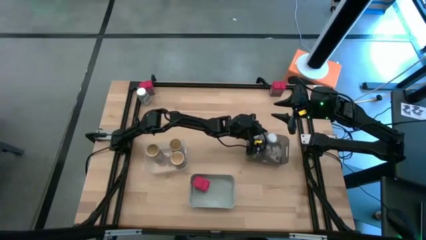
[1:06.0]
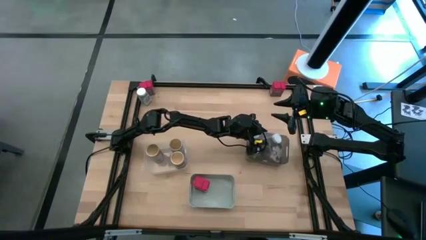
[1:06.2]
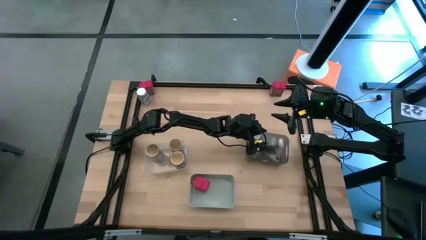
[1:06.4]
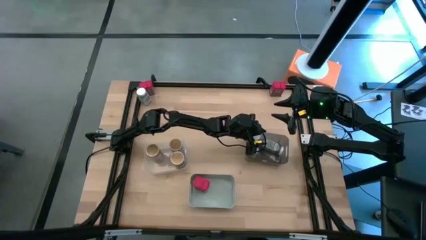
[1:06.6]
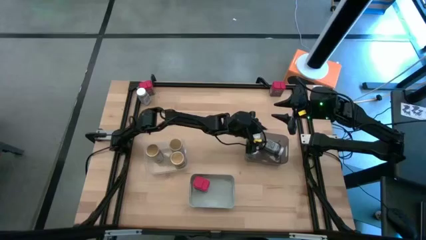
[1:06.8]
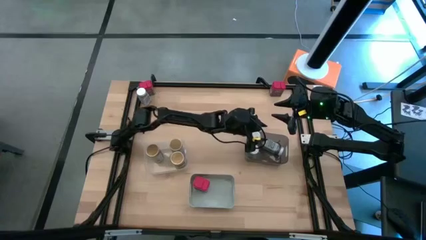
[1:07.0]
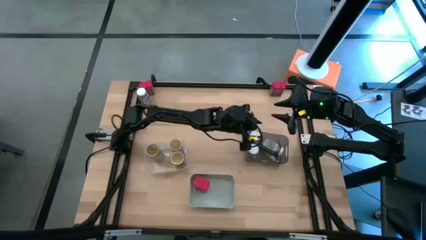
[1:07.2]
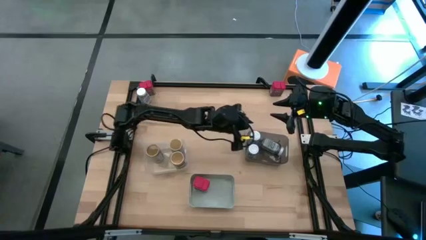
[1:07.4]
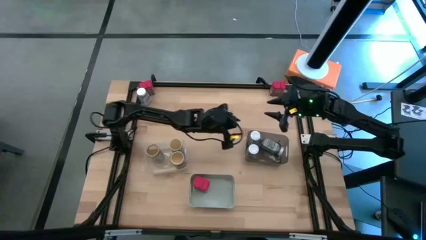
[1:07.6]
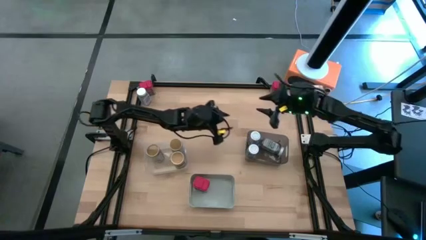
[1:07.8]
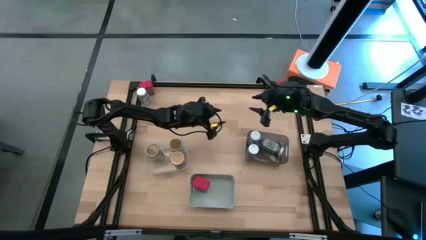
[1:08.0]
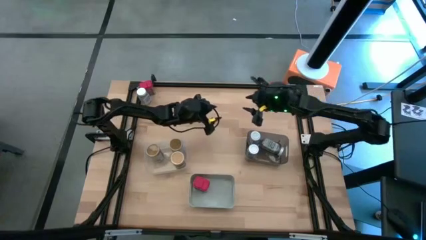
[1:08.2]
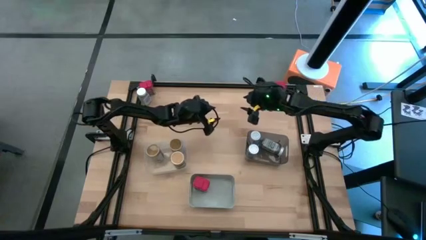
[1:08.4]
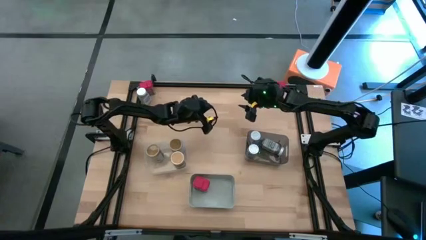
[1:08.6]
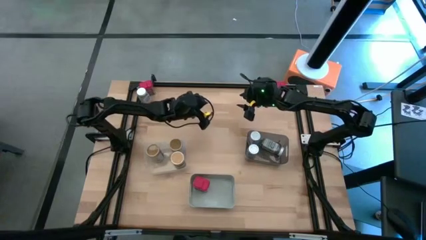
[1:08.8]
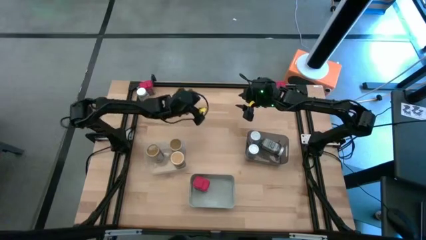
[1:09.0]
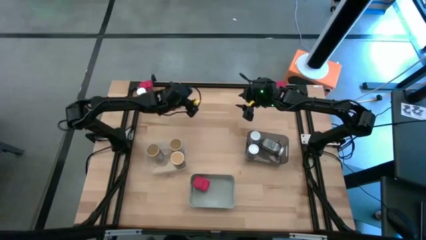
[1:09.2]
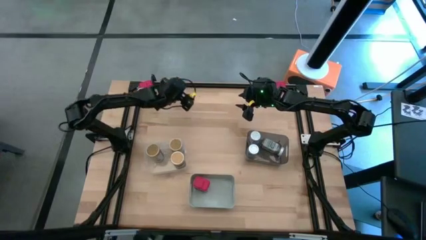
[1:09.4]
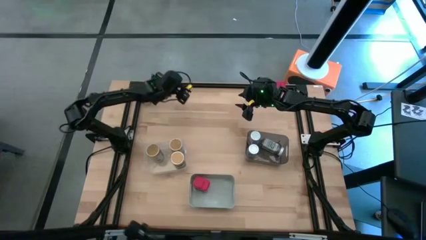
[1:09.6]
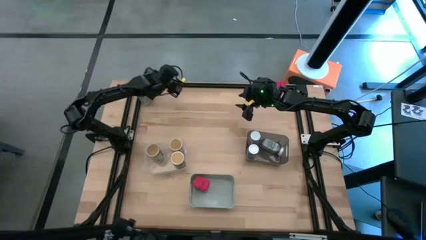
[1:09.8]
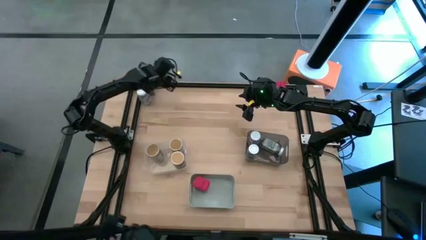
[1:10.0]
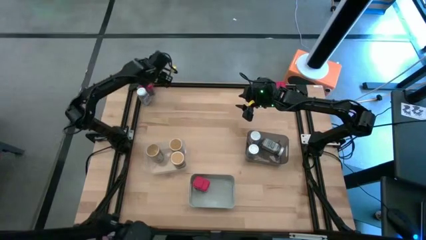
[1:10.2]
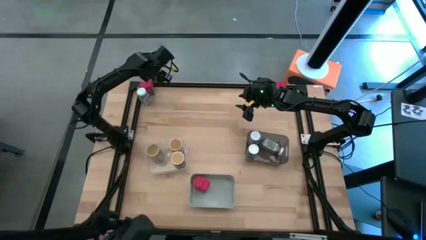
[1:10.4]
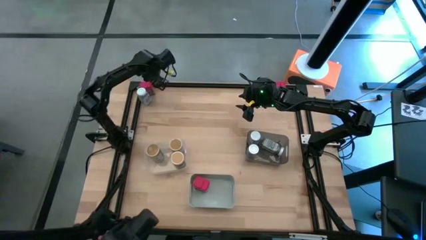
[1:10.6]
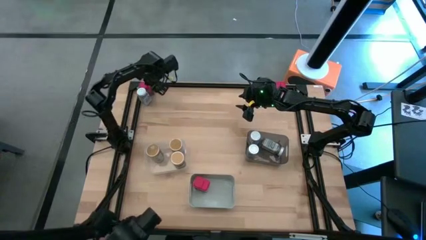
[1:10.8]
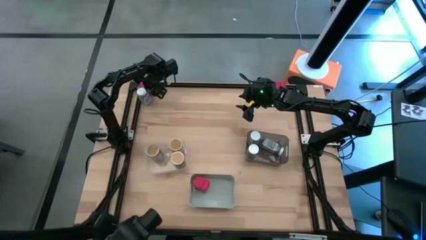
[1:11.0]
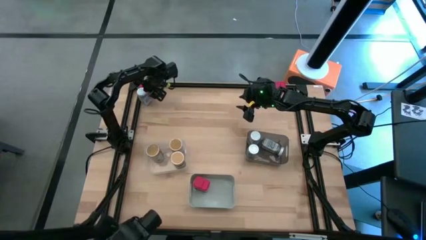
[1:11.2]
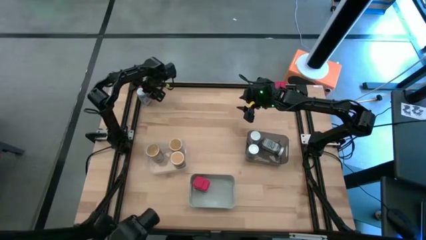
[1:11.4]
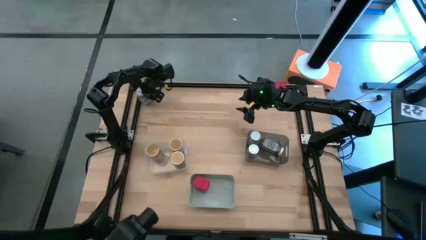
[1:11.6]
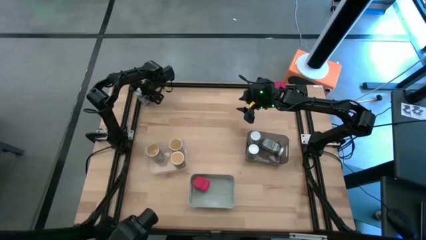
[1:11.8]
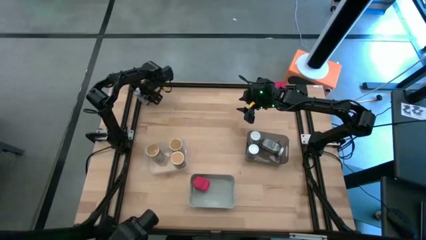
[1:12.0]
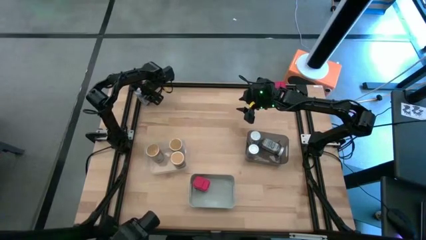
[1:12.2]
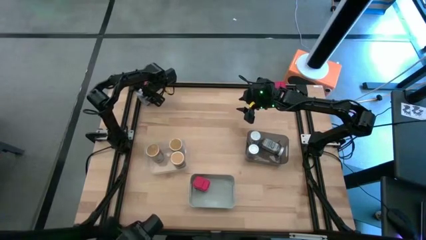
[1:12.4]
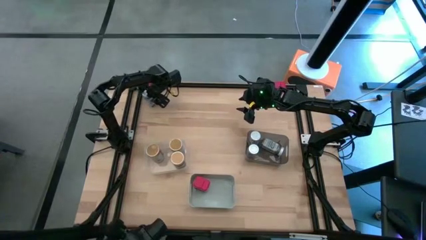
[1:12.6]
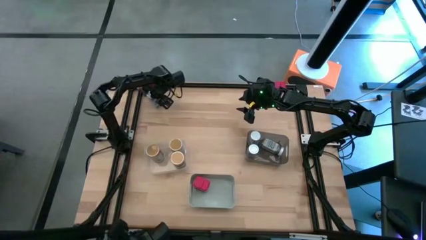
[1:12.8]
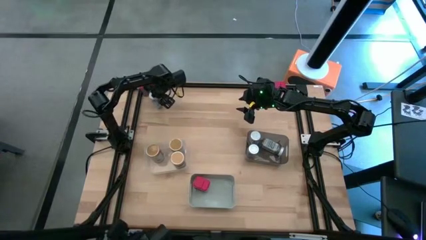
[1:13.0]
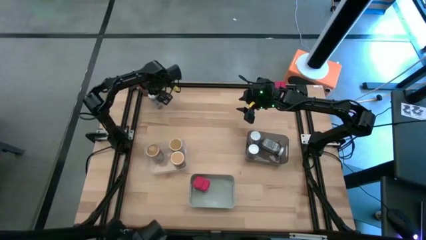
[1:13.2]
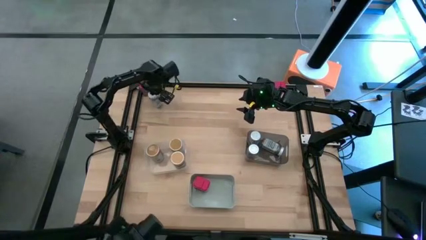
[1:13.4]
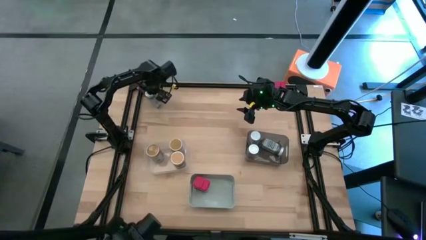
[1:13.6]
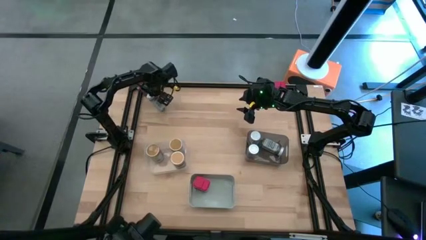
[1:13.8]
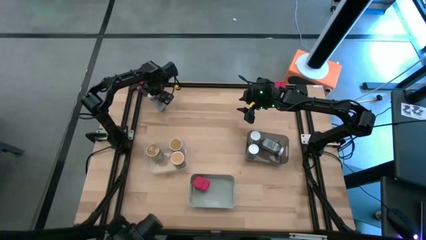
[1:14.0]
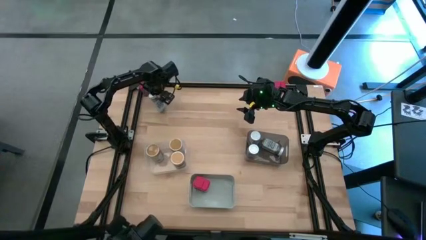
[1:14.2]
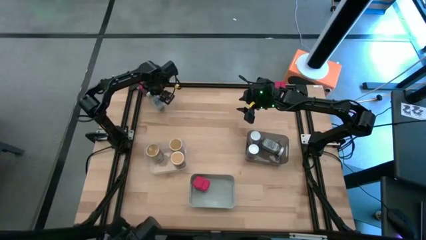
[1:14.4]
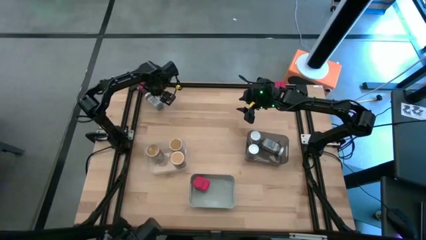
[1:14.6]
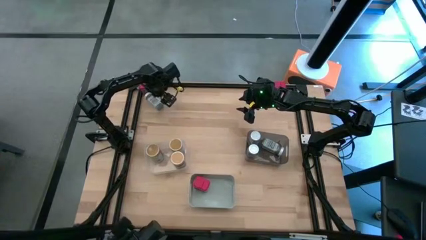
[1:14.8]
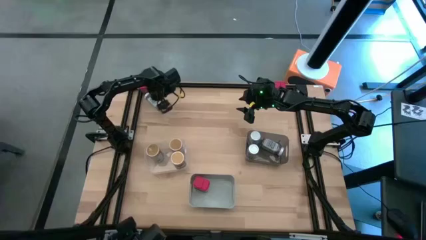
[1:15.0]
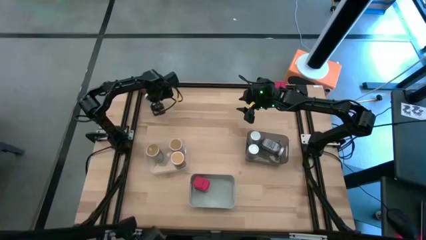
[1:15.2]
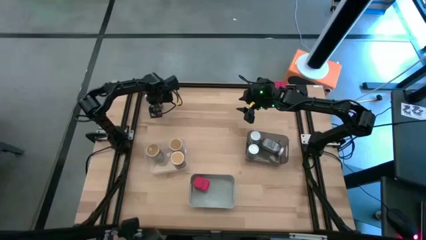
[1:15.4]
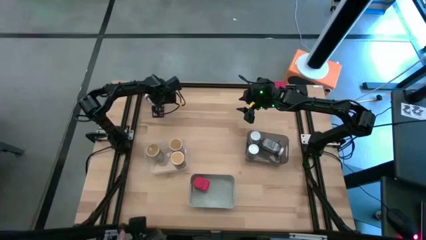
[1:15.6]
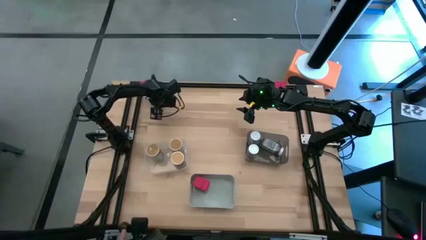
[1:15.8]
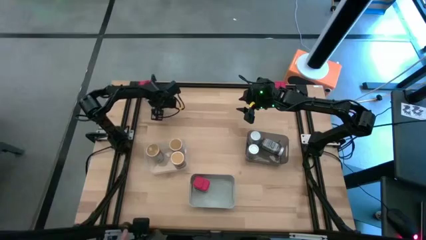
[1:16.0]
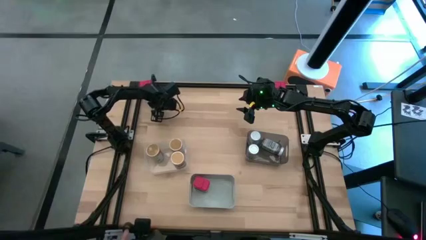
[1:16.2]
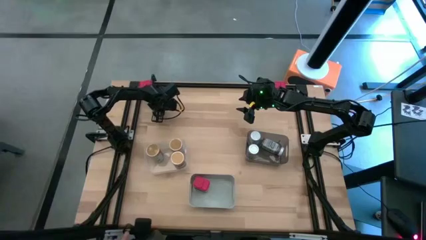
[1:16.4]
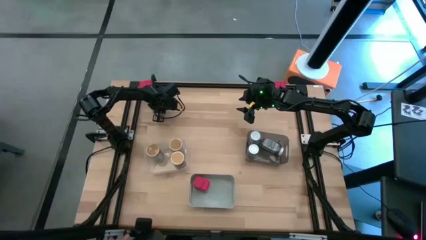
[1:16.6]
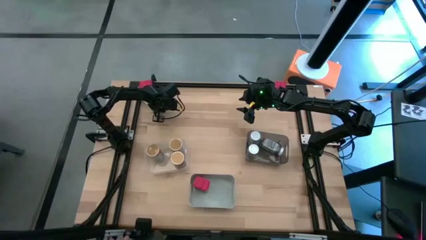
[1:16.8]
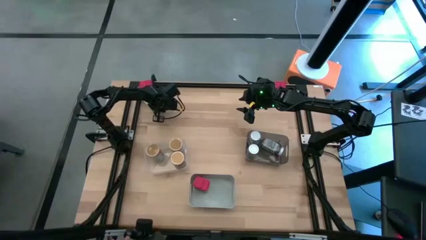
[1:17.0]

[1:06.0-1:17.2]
Task: Sort spices by type
Put the white seasoning bottle into the black bin

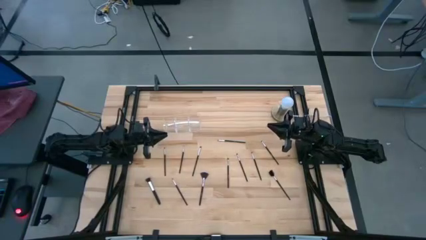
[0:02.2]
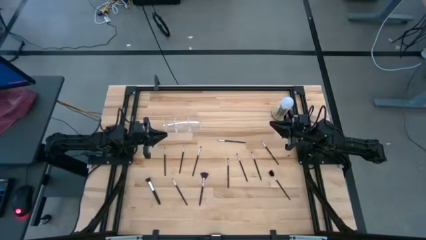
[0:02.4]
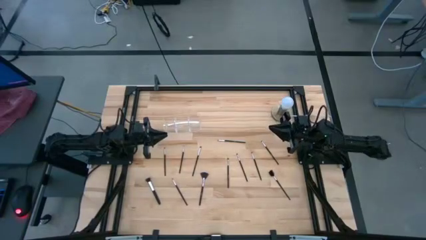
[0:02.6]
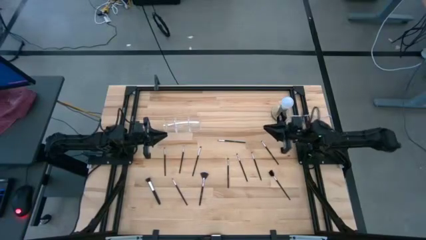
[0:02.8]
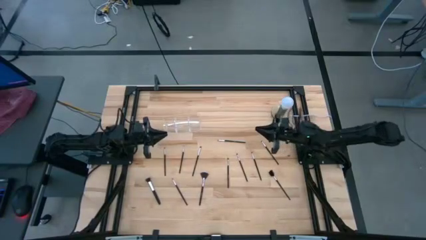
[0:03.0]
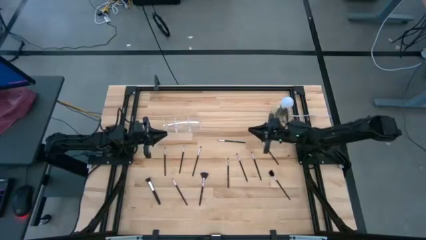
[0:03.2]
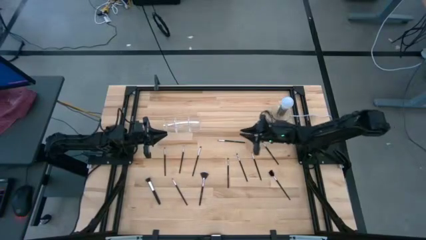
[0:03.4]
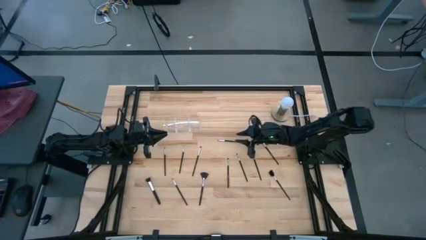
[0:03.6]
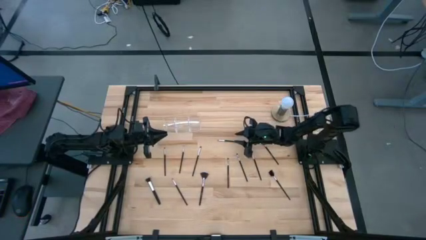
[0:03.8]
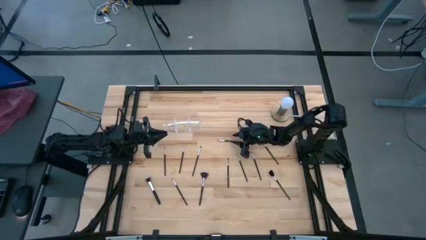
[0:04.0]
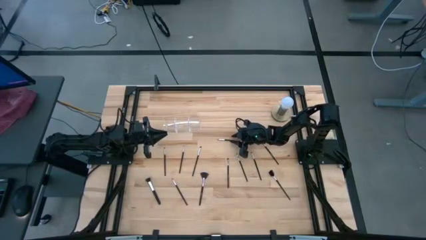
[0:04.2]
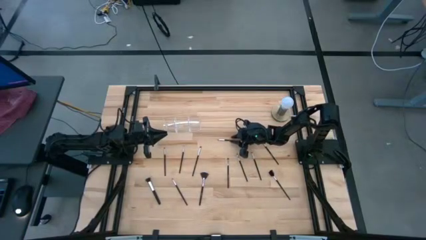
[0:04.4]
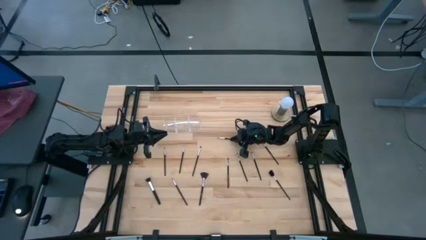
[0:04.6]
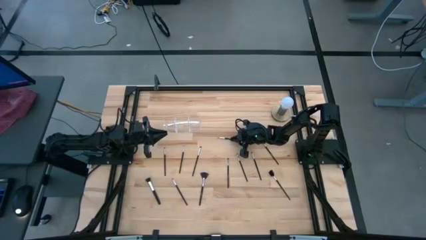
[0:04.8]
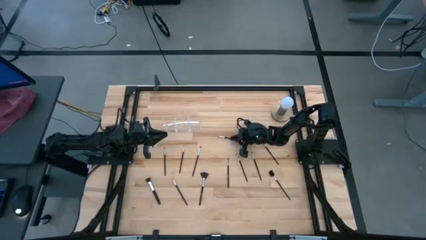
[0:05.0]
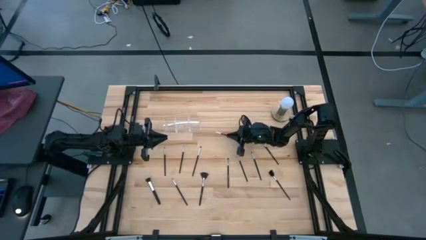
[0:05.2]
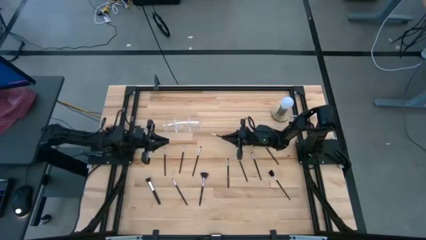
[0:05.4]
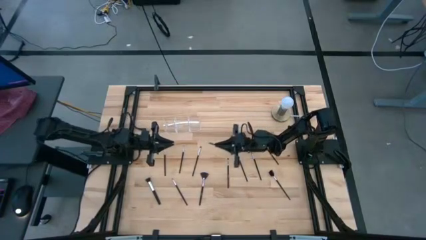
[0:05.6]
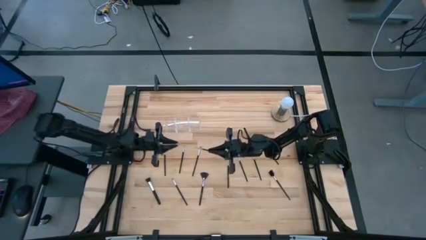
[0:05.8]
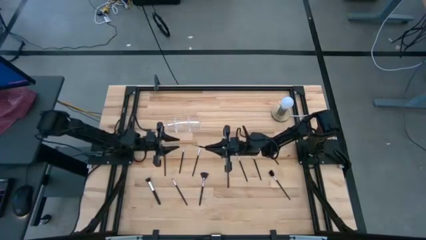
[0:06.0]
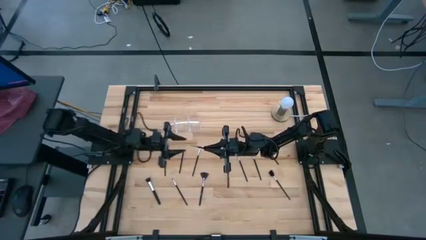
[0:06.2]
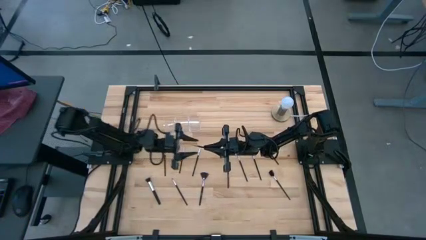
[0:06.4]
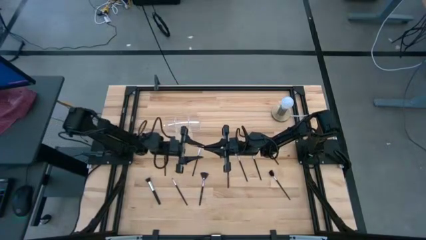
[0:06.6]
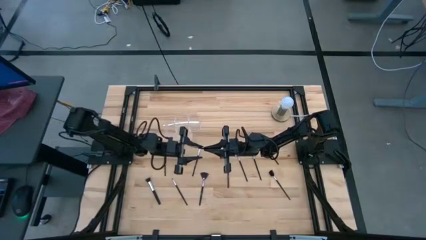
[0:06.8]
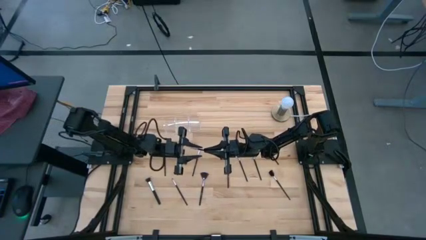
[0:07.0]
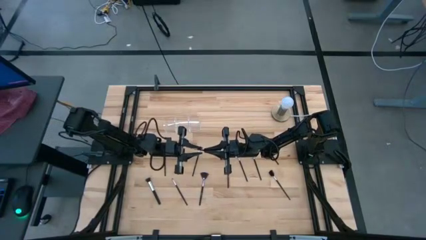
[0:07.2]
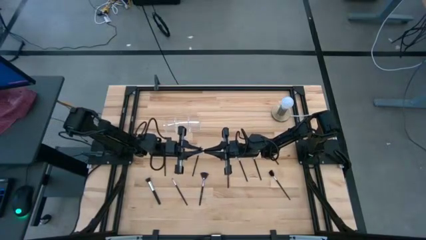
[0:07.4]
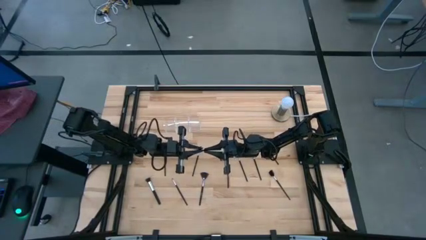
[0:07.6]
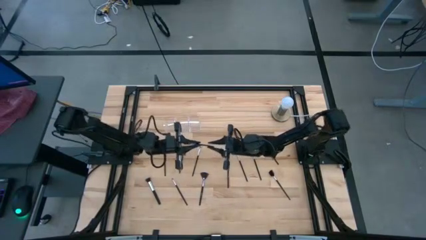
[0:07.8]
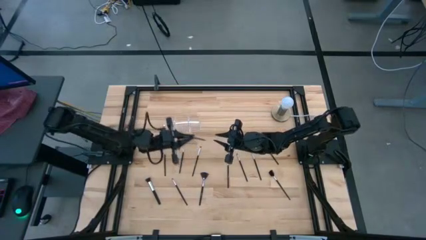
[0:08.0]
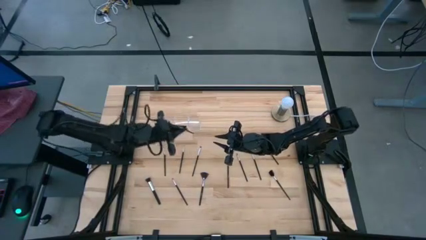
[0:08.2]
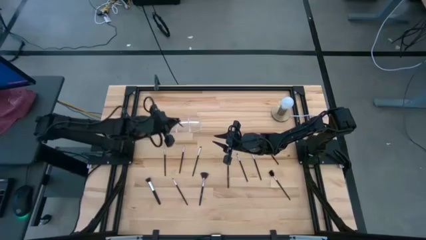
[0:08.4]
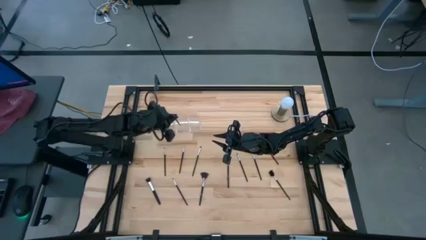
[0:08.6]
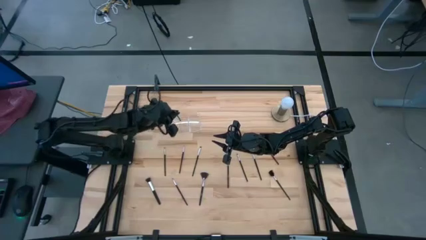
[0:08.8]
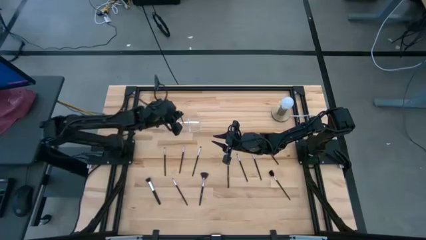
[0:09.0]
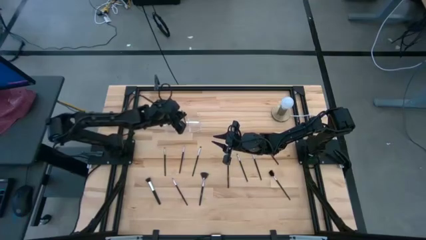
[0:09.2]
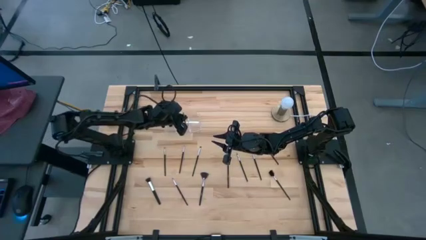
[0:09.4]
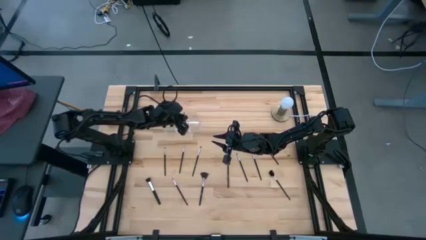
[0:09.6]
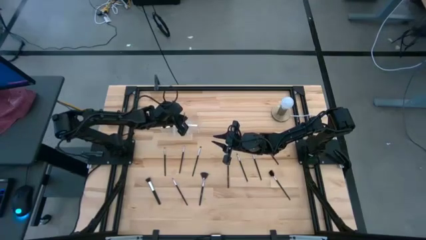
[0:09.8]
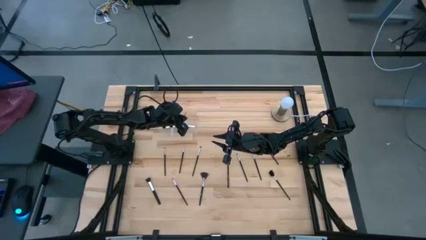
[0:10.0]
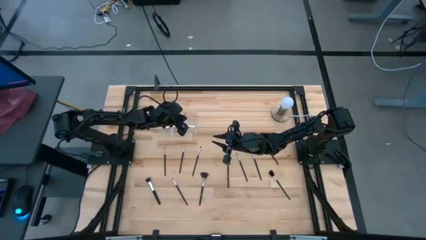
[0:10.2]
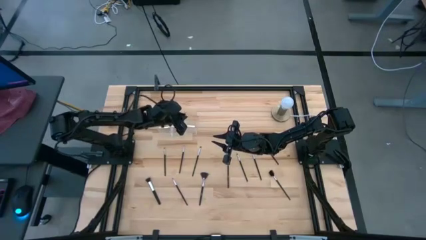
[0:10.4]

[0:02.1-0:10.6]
Task: Pick & Place Makeup Brushes
Put the black eyeshadow brush into the transparent organizer
